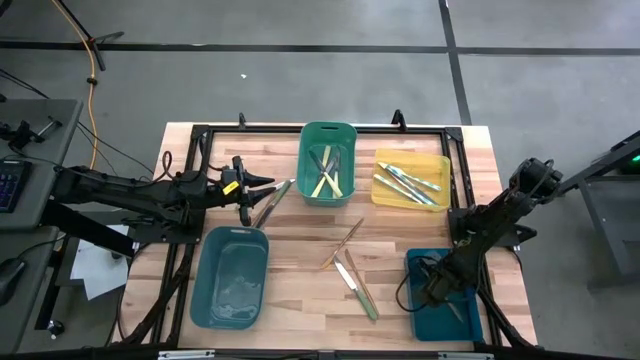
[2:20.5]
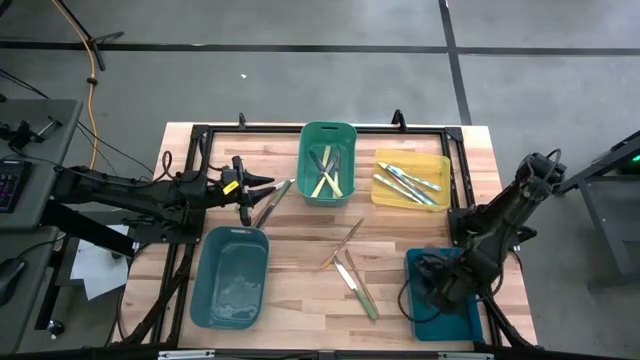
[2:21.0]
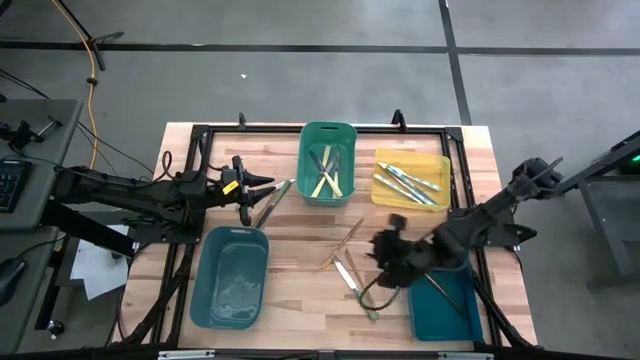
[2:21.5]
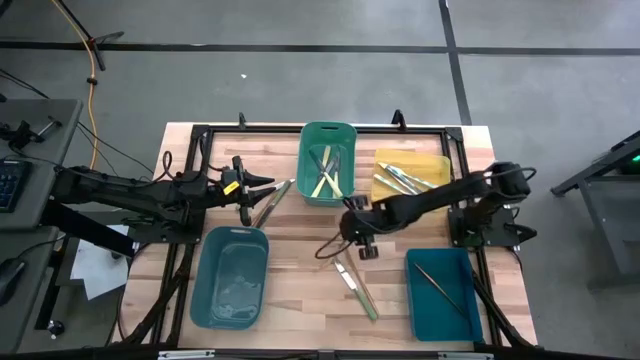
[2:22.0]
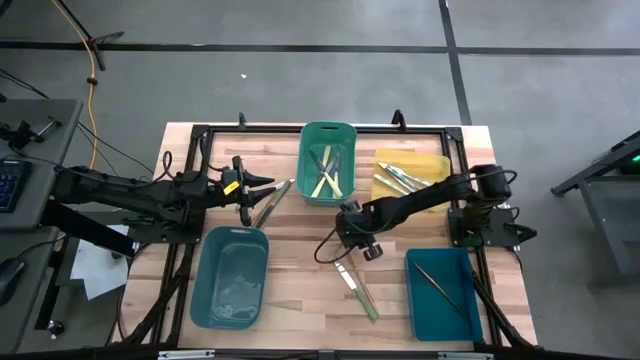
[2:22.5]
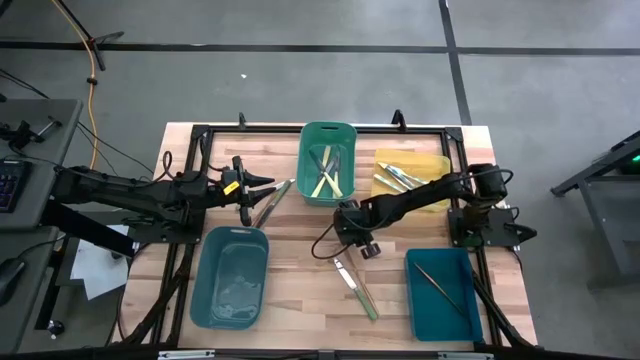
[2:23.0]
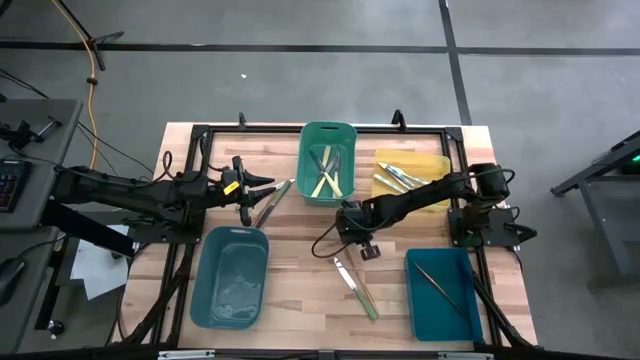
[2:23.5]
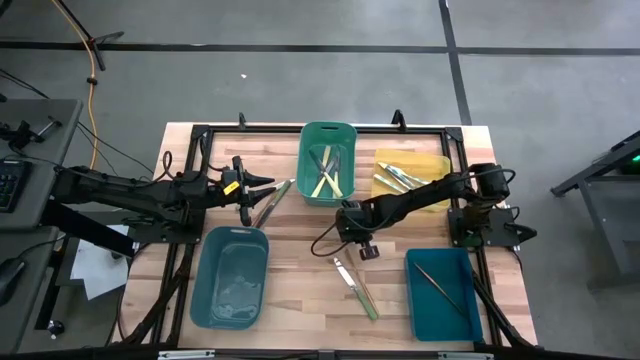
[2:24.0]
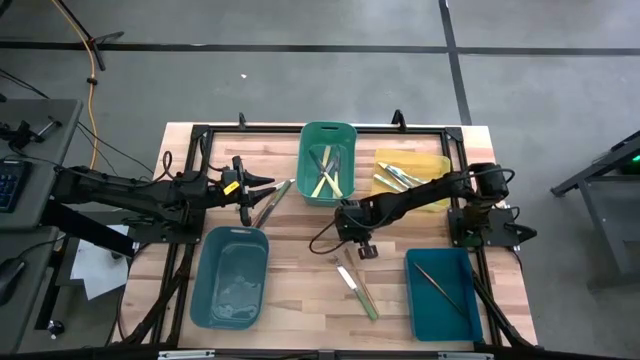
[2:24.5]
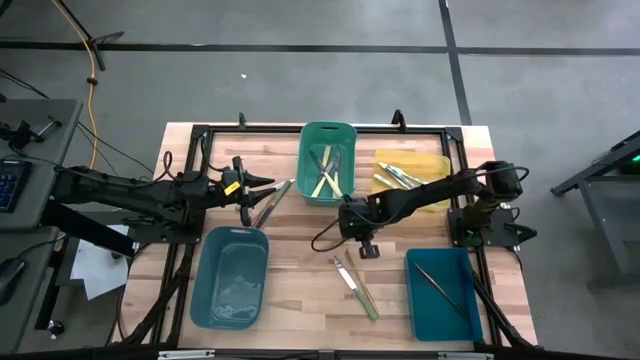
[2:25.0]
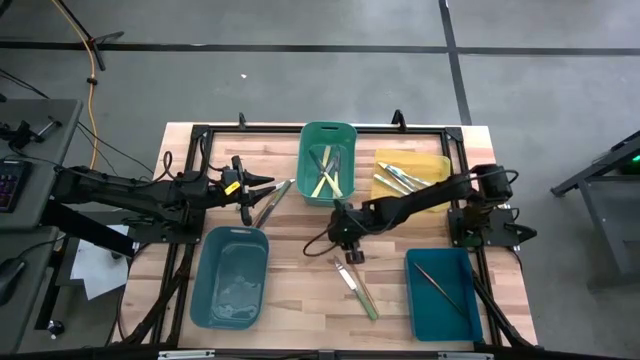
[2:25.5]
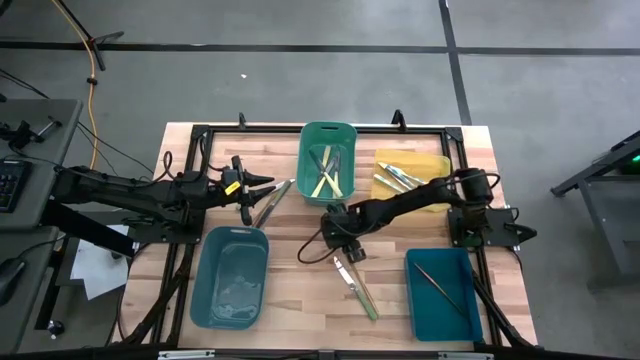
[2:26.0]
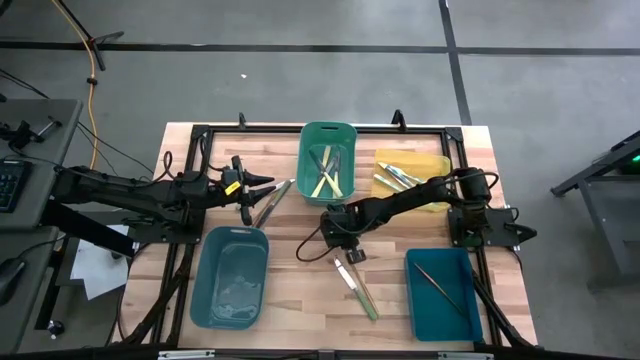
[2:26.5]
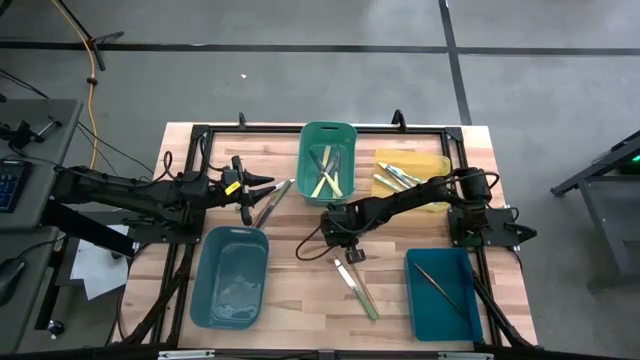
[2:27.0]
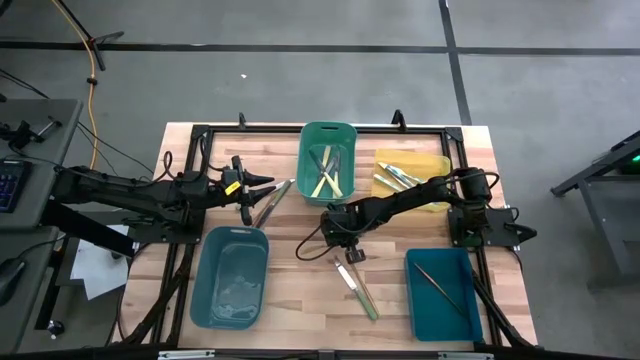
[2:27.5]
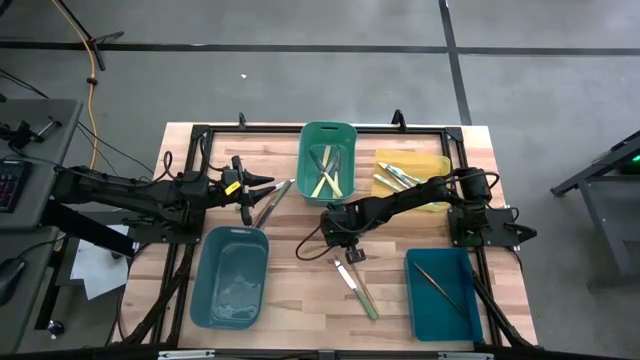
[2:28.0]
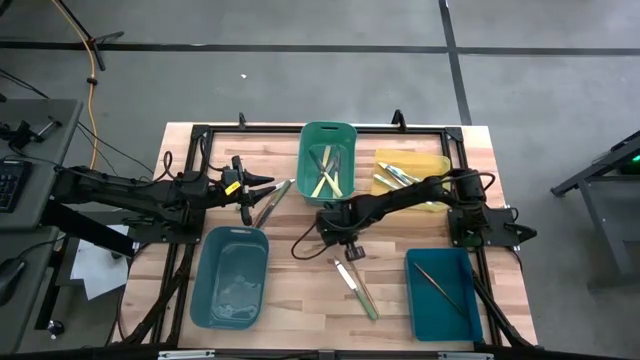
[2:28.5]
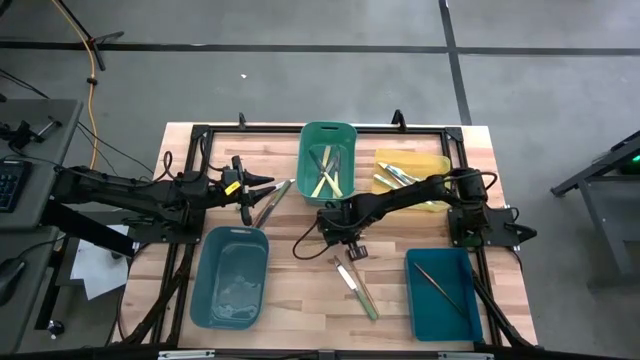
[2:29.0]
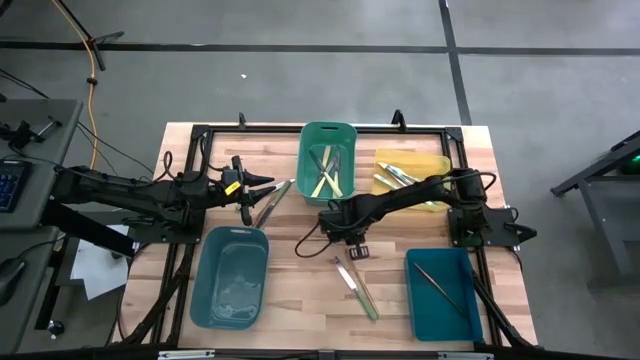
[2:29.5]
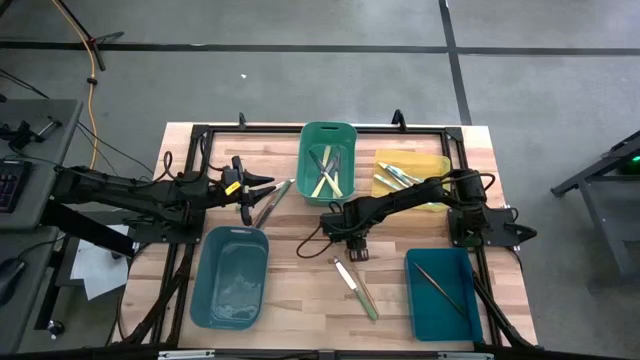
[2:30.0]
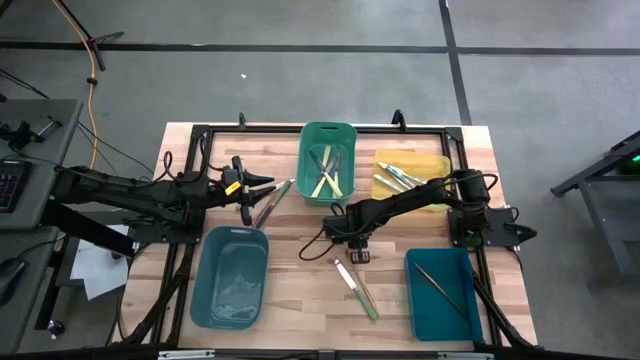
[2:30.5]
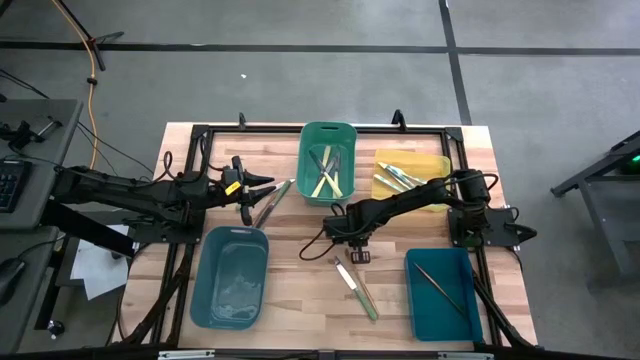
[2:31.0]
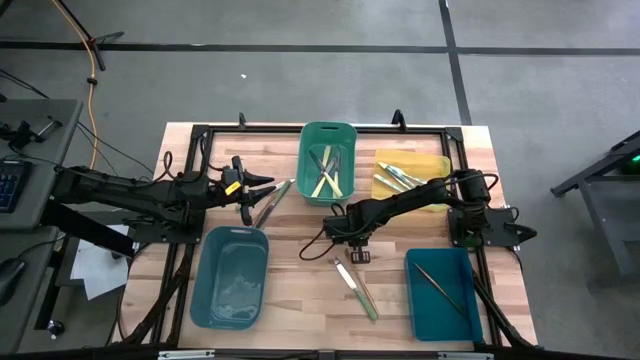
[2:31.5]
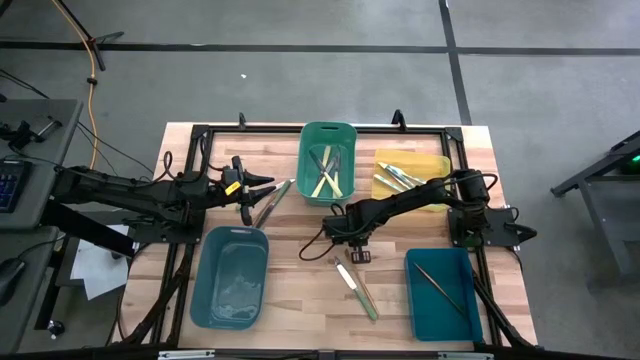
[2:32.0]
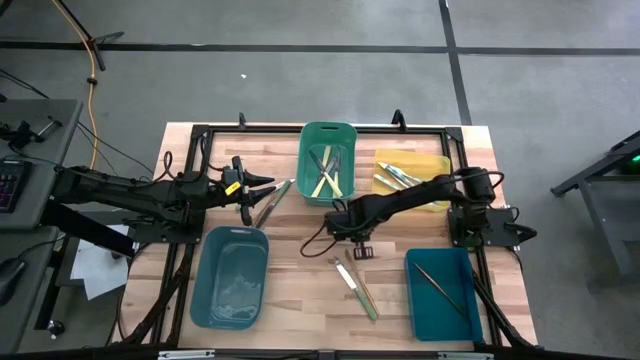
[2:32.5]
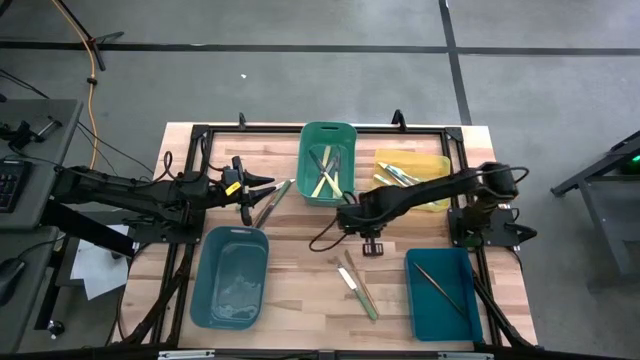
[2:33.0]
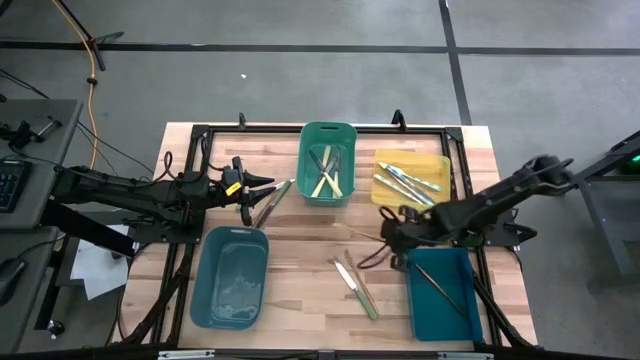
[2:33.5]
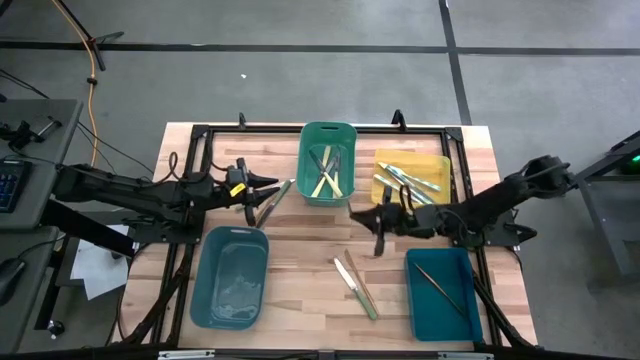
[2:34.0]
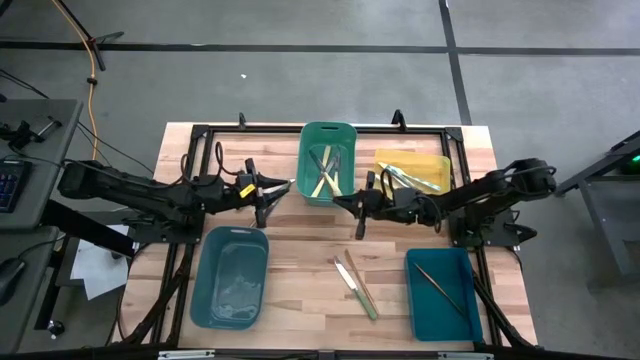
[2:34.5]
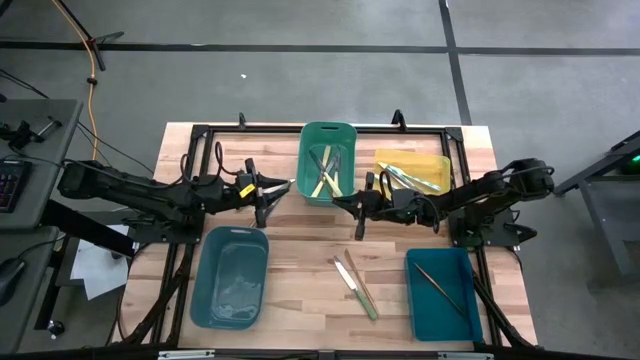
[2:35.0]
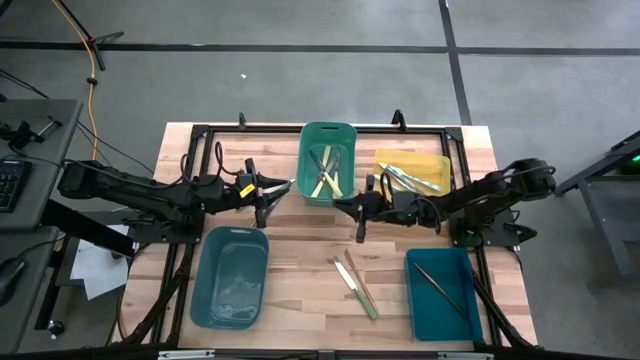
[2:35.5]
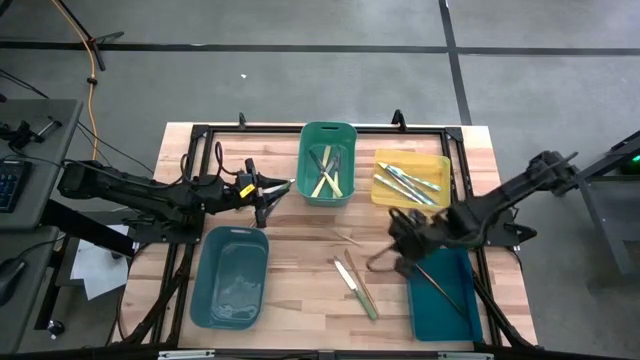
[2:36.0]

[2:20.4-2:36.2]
Task: Sort silverware by color (type)
Put the gold knife into the right blue bin
